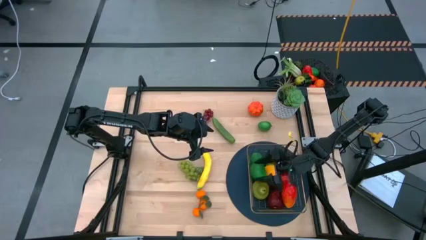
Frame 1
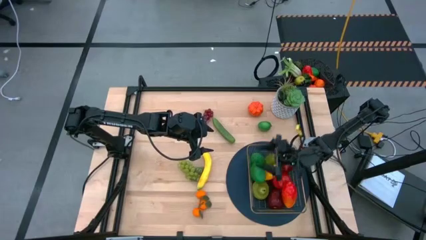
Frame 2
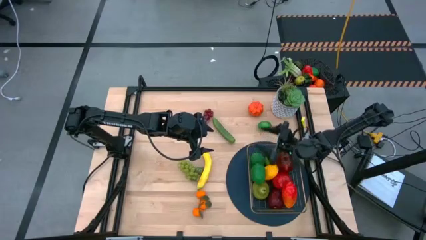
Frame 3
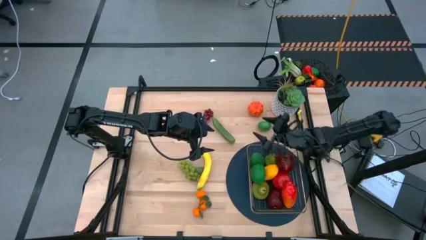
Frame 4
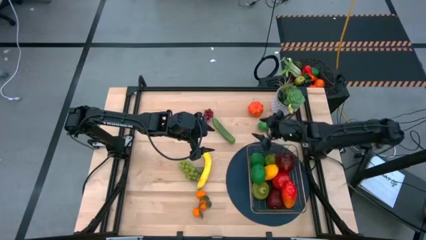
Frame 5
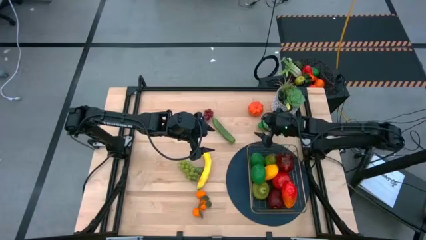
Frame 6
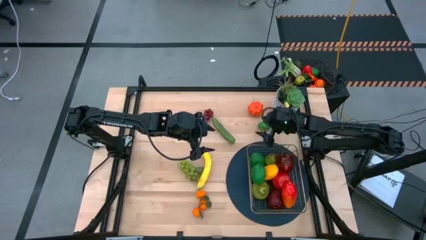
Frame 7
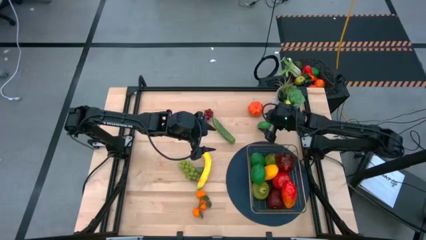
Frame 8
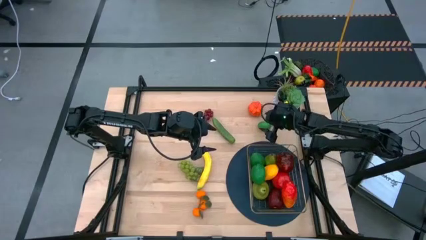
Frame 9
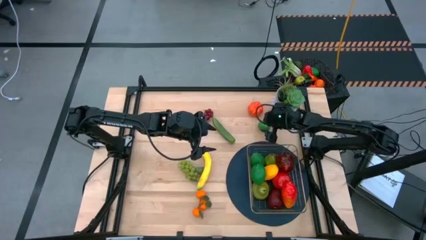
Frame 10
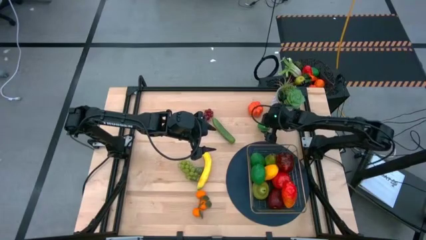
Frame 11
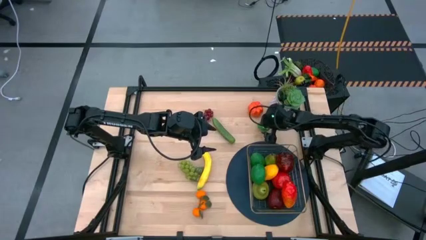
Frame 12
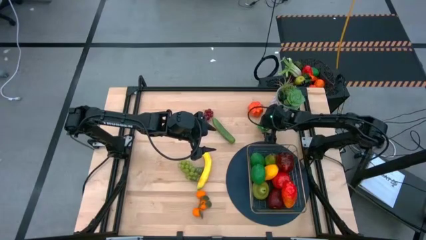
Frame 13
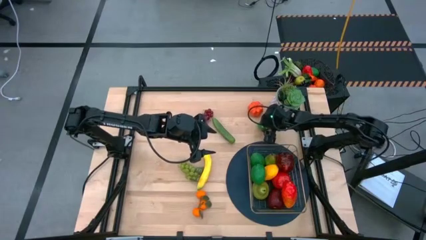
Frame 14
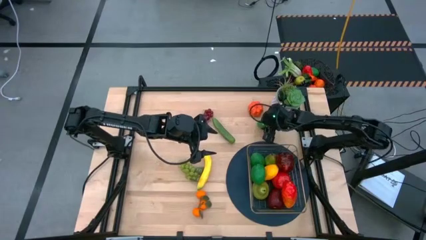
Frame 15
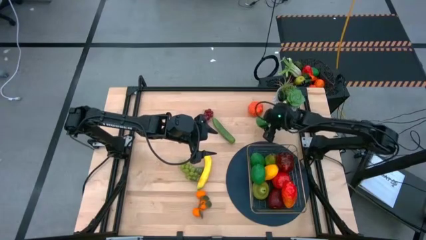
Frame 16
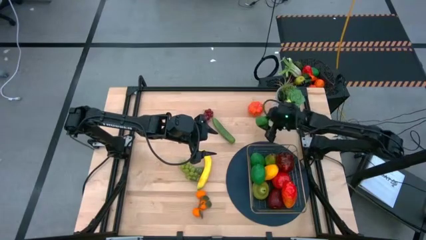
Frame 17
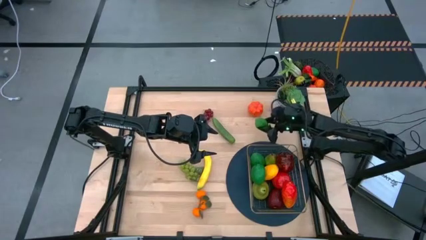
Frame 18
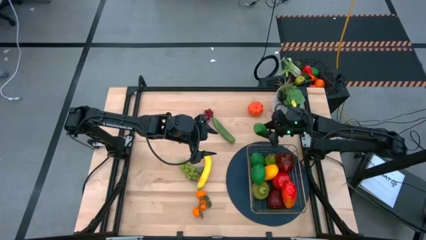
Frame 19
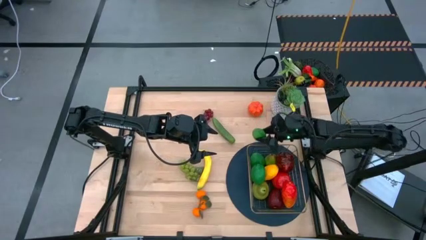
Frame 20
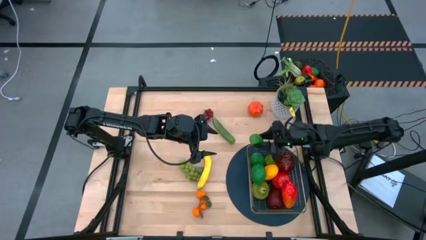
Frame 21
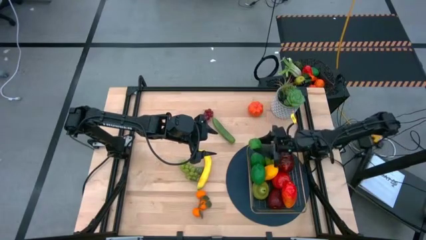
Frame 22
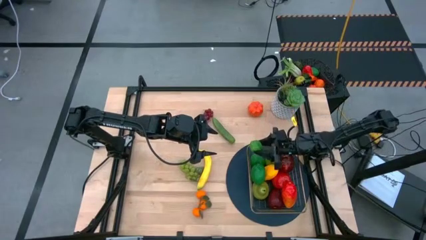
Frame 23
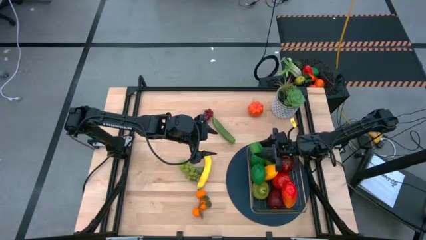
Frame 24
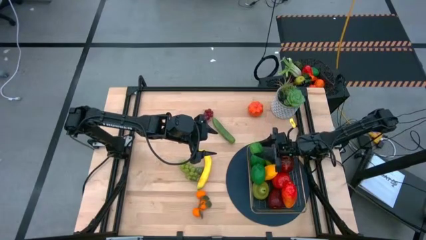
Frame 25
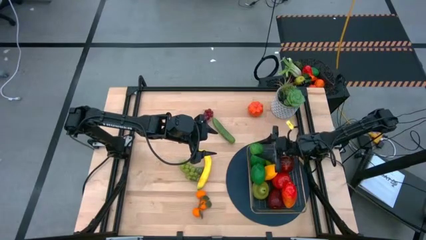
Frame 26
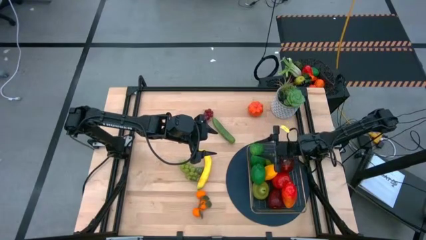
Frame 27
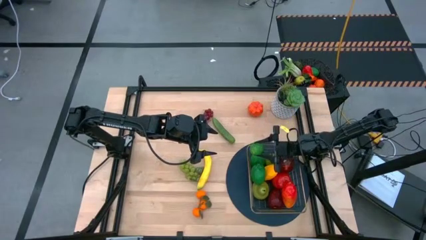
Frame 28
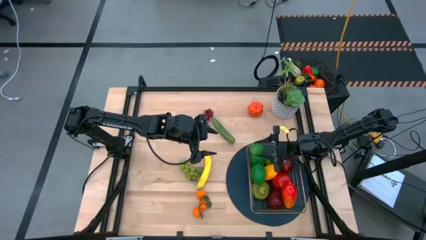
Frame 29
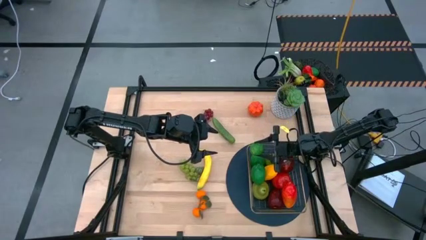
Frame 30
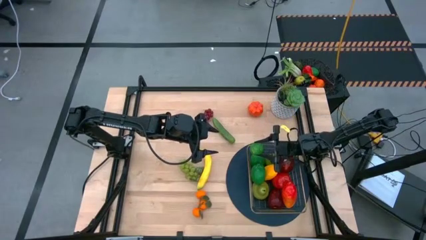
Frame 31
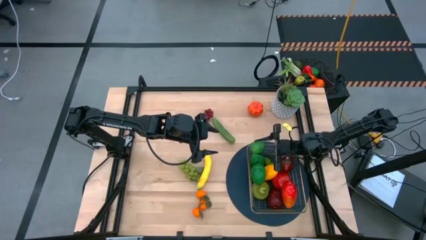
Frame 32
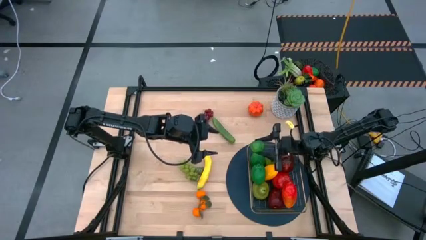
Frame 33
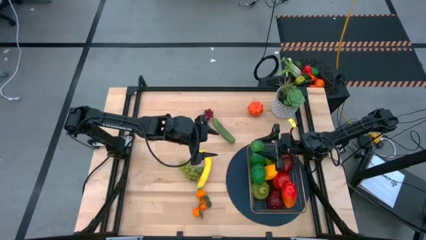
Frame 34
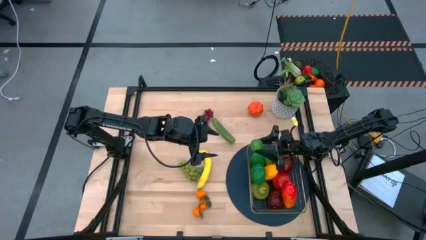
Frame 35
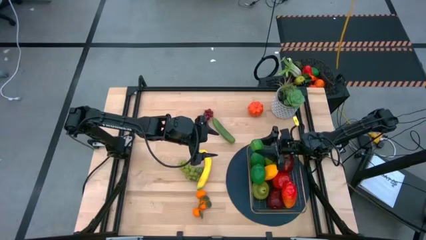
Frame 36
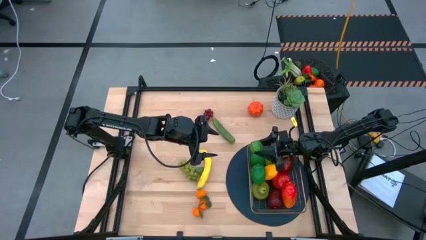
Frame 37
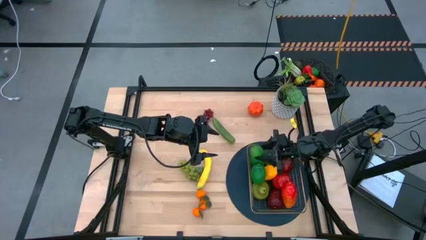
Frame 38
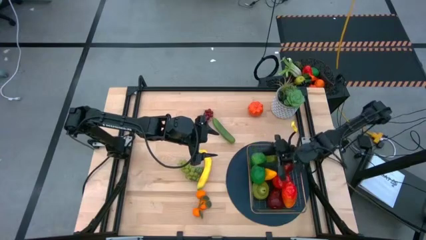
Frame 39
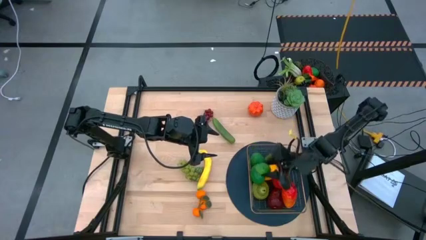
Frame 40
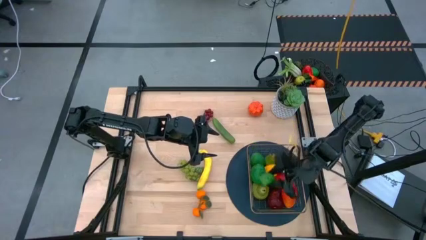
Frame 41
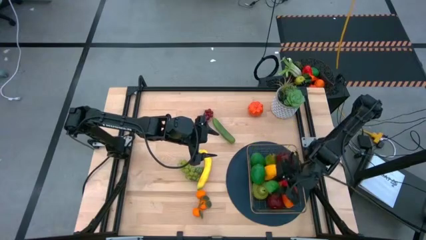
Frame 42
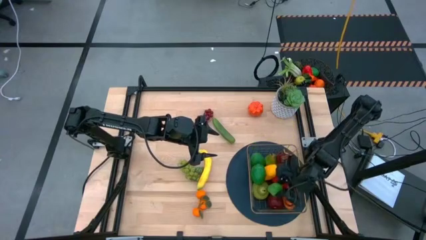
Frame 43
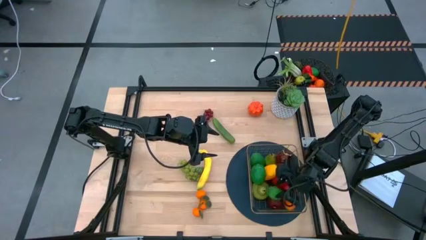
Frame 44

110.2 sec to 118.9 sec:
Task: Build produce basket
Put the lime into the wire basket

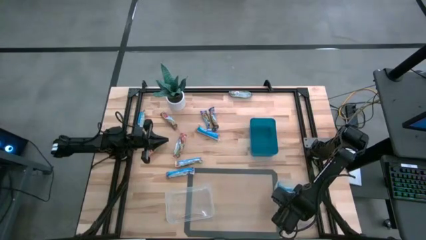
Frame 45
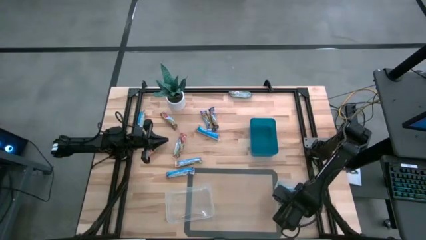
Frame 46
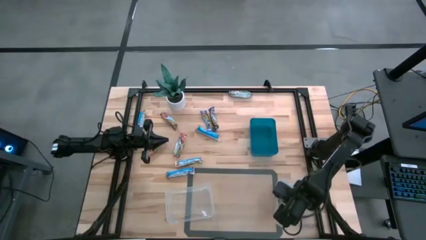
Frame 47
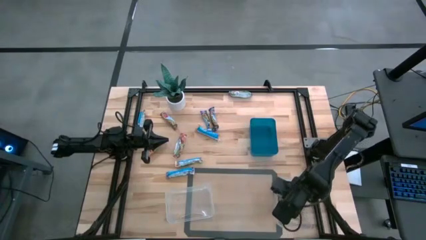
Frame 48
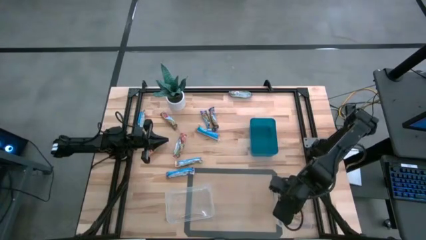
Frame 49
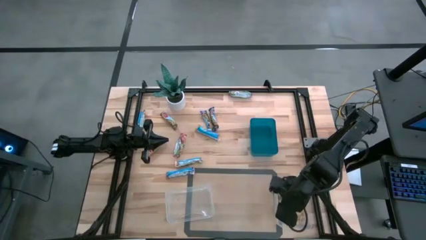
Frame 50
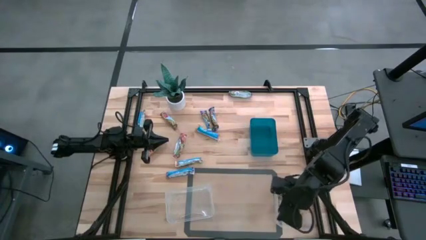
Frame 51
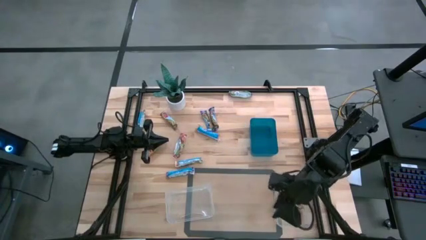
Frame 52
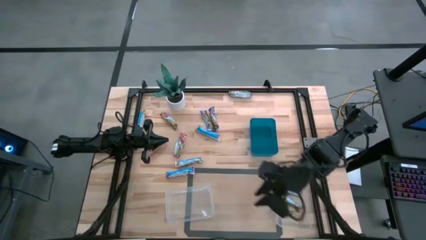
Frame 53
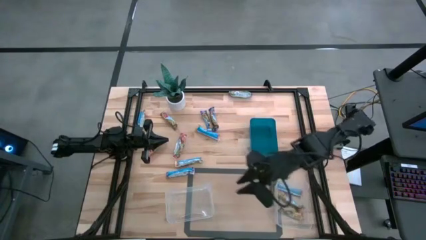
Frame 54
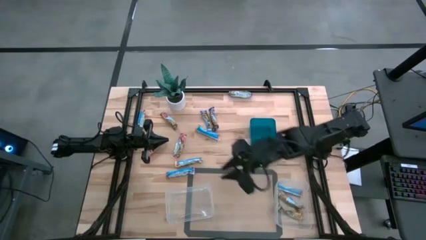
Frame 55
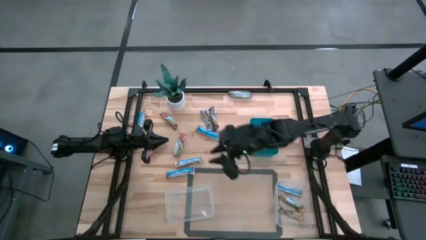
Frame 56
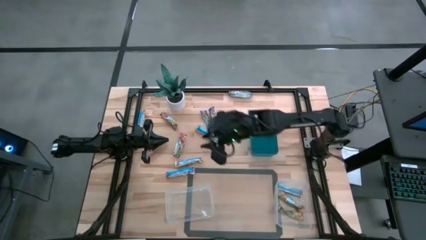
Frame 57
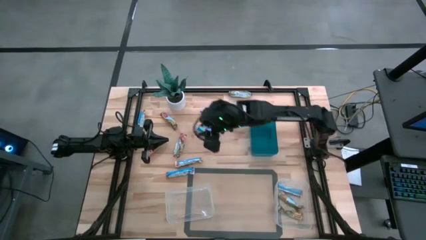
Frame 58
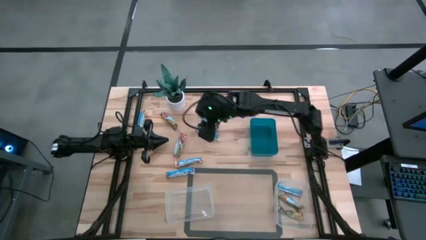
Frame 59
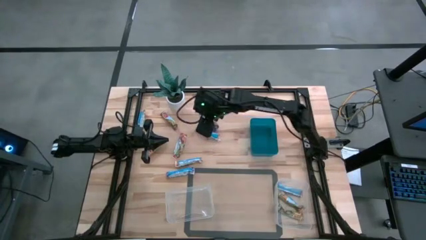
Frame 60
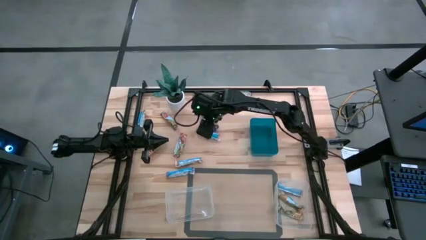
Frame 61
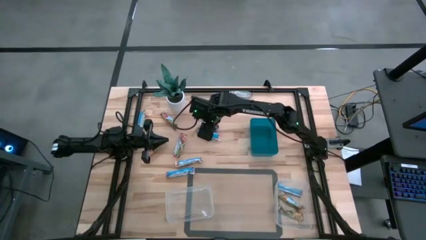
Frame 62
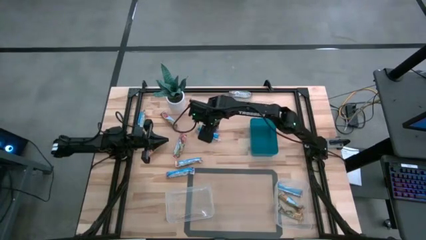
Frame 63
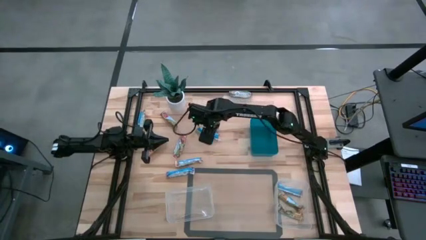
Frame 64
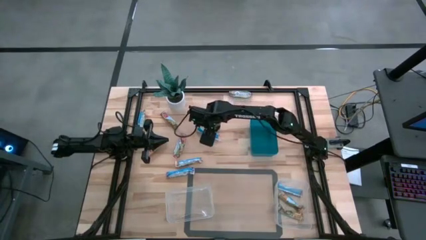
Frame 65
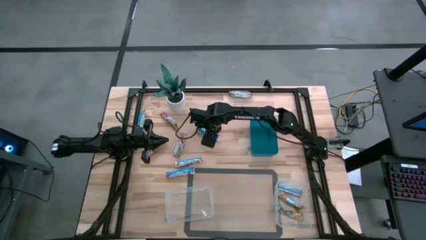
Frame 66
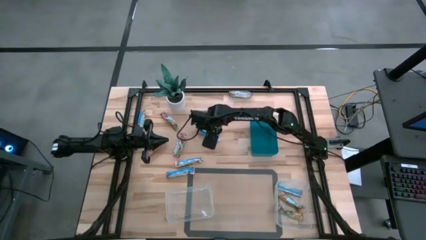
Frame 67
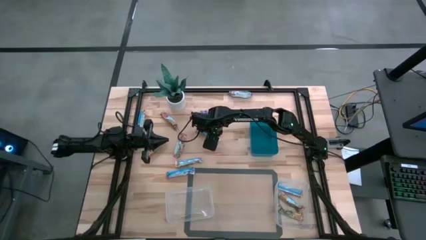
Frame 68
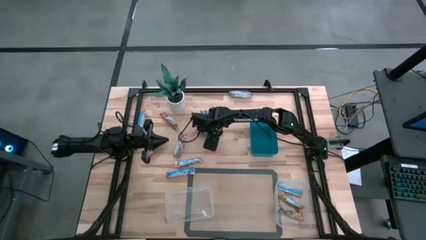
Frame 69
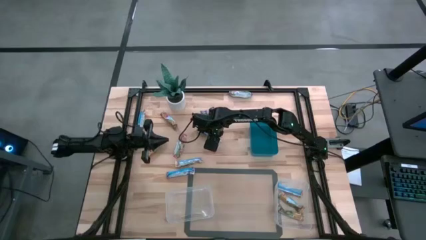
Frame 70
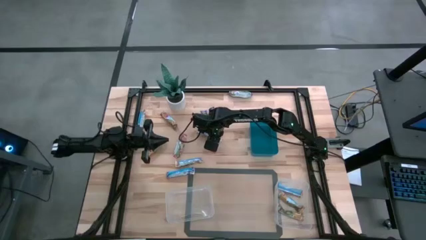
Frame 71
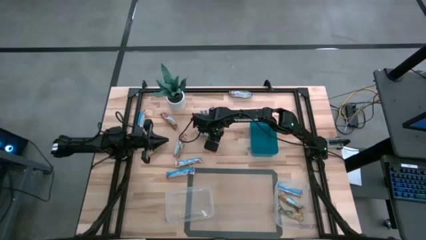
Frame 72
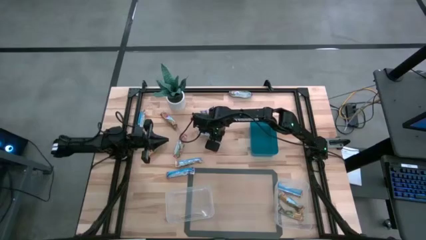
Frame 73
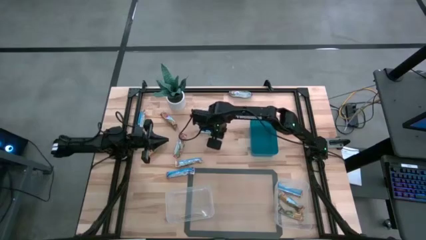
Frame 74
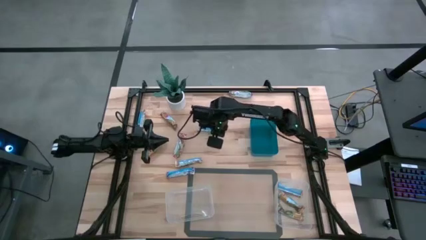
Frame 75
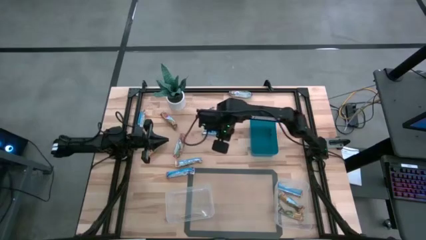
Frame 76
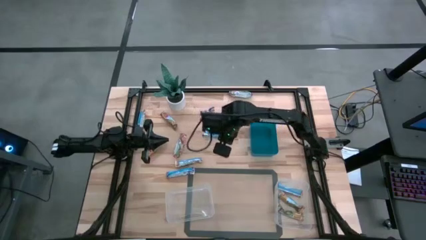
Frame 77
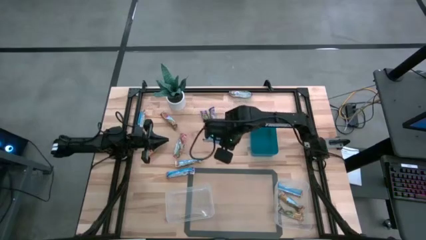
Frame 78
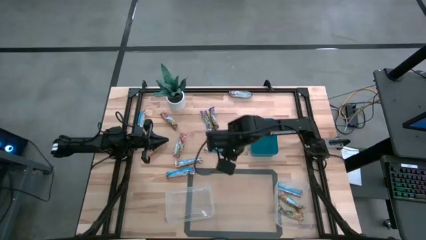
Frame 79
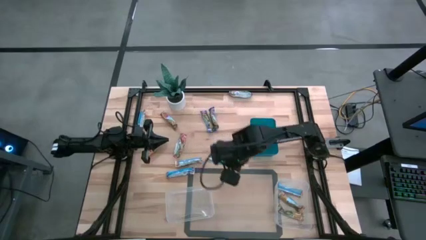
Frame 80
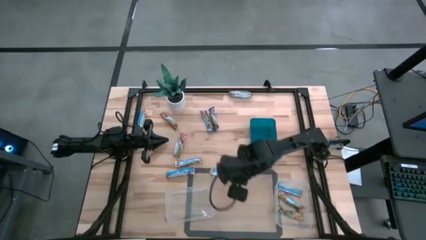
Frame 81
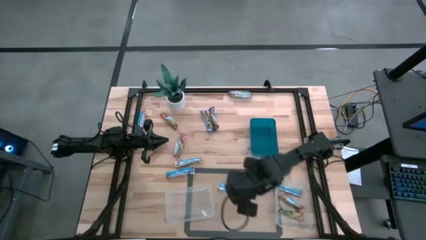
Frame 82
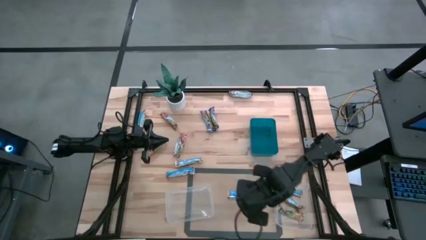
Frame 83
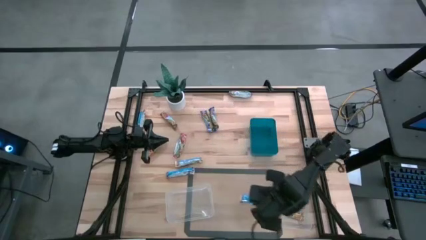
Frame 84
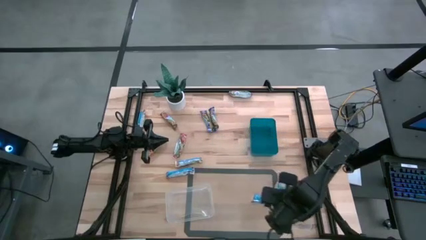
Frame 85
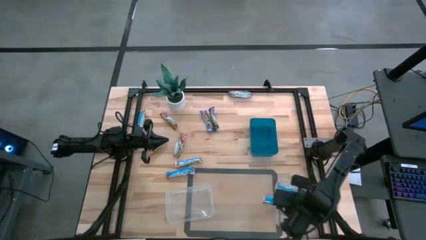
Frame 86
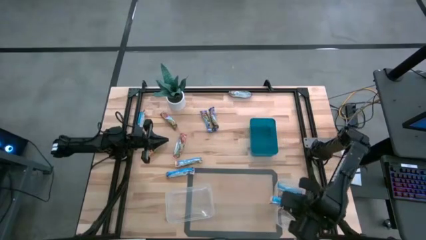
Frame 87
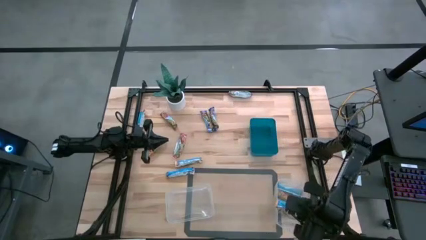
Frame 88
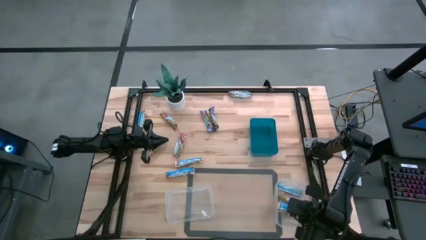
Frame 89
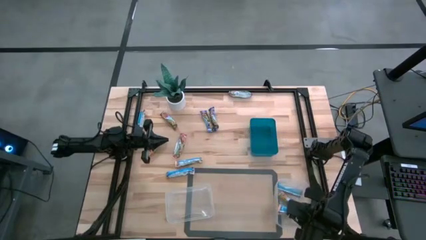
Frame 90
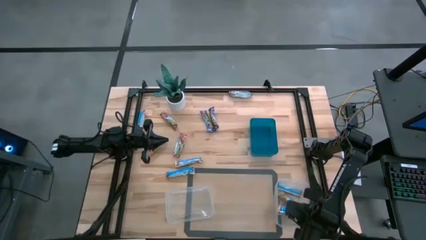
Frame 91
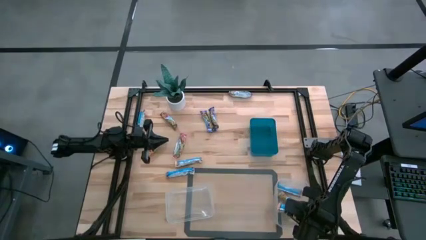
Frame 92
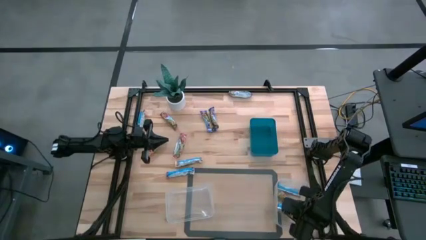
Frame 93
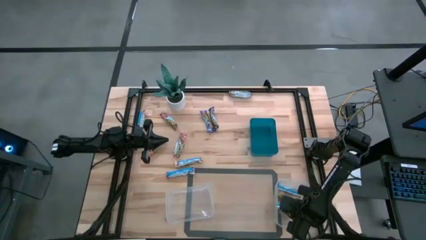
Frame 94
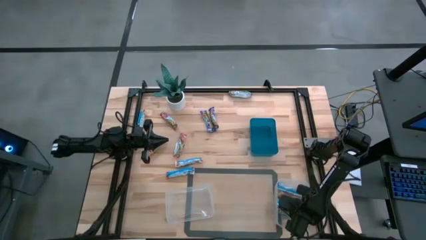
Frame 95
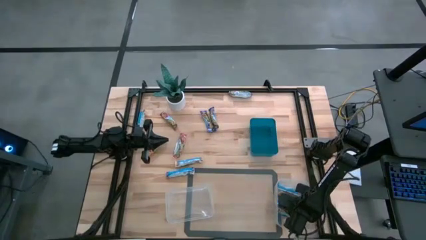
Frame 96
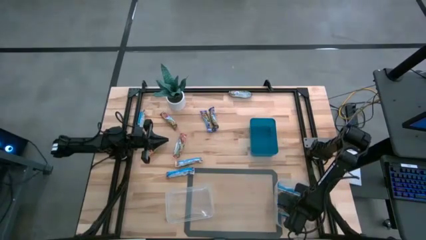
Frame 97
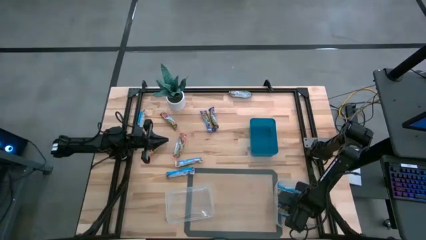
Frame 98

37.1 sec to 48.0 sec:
Task: Pick and place Granola Bars by type
Put the top yellow granola bar into the right transparent bin
